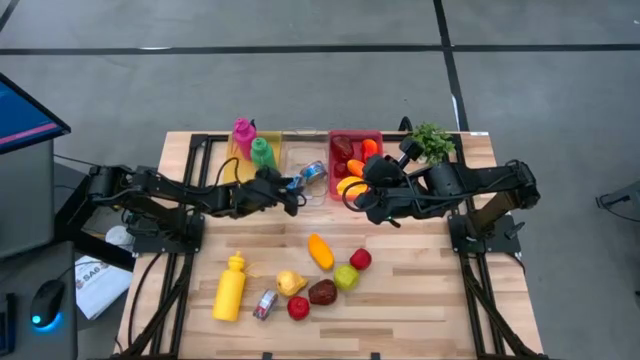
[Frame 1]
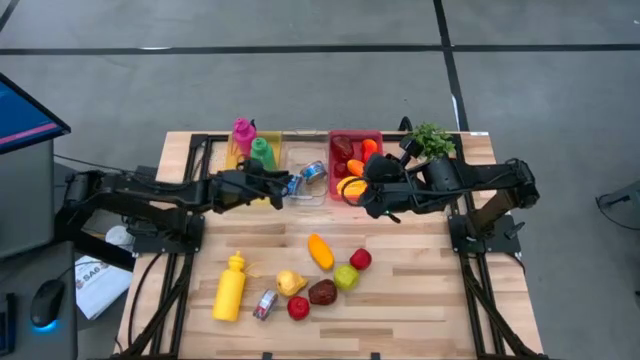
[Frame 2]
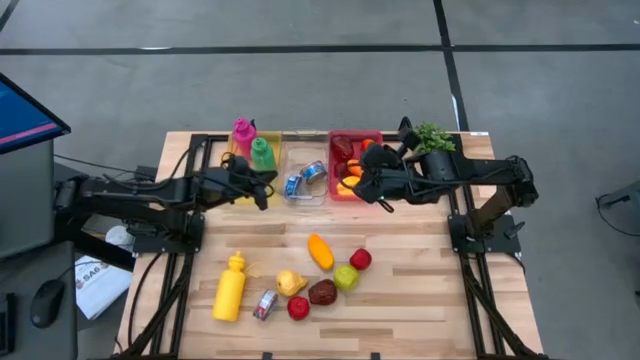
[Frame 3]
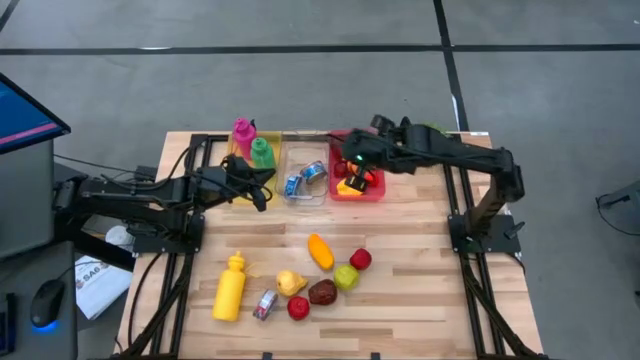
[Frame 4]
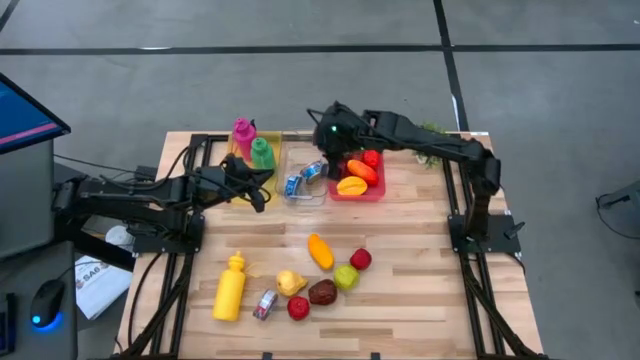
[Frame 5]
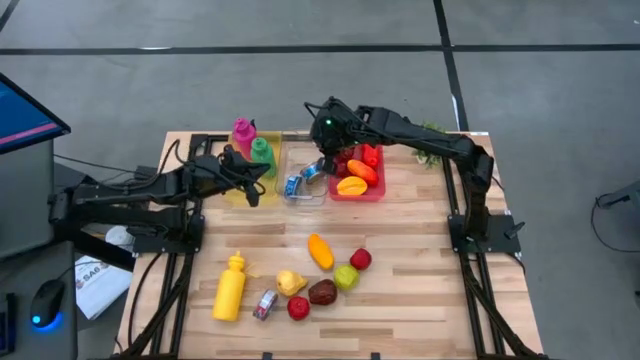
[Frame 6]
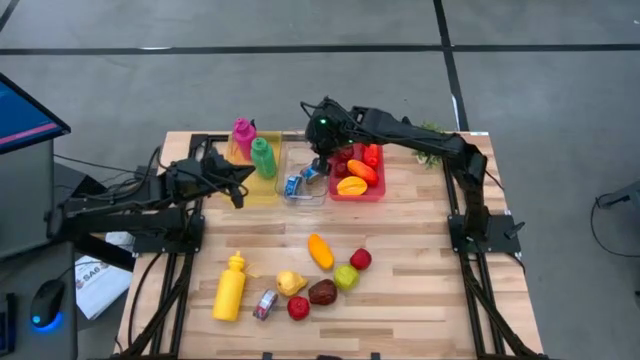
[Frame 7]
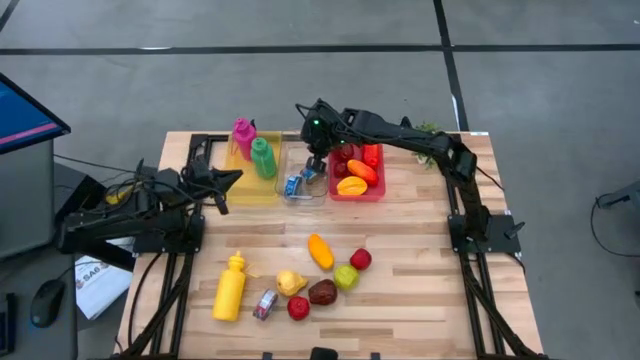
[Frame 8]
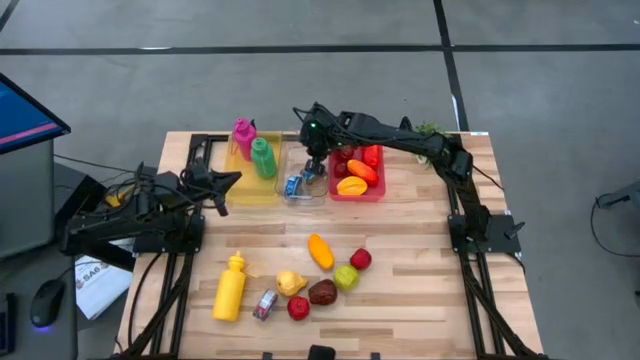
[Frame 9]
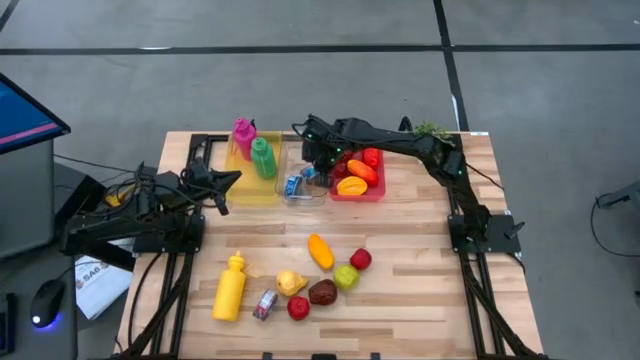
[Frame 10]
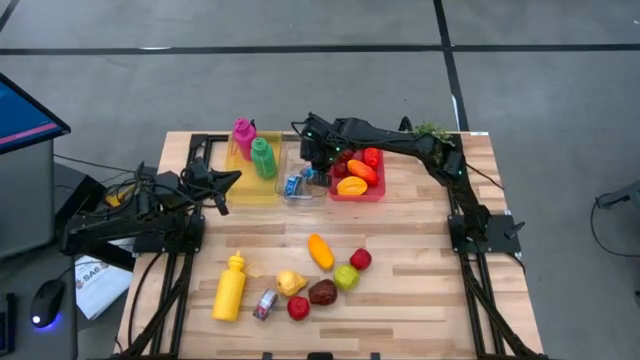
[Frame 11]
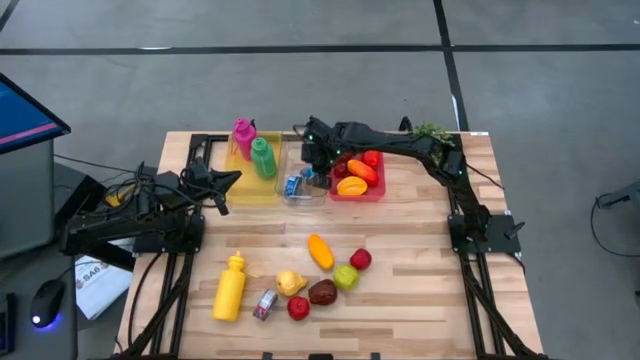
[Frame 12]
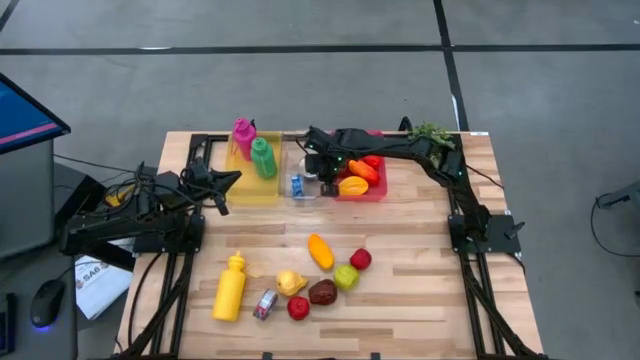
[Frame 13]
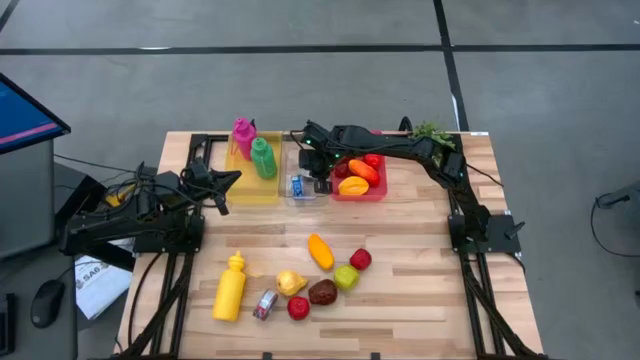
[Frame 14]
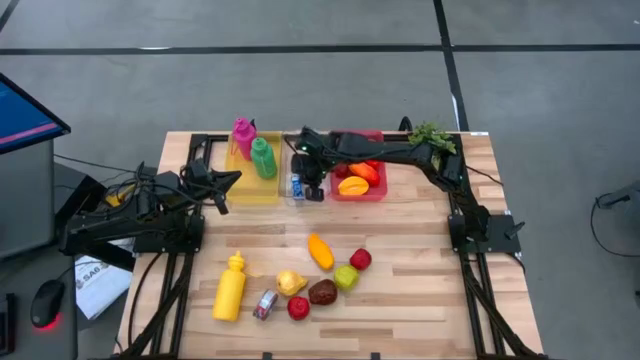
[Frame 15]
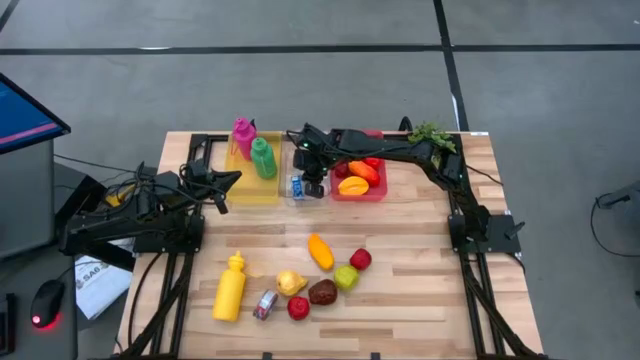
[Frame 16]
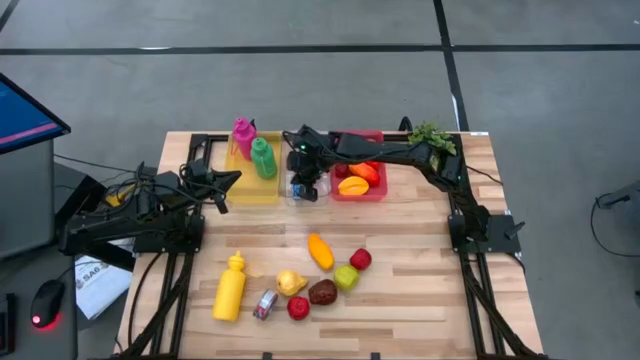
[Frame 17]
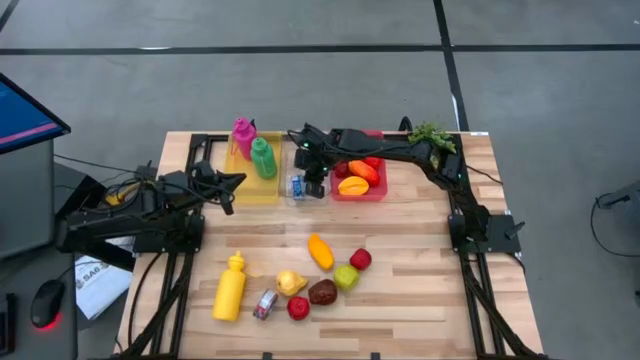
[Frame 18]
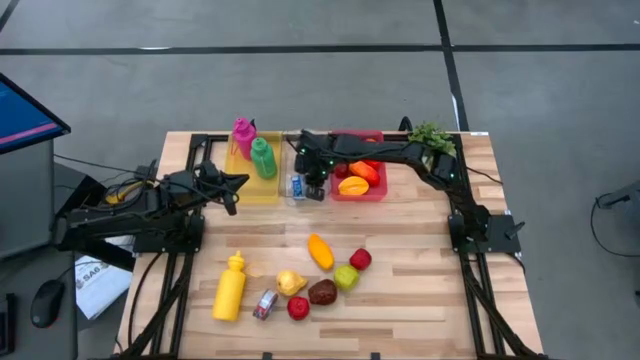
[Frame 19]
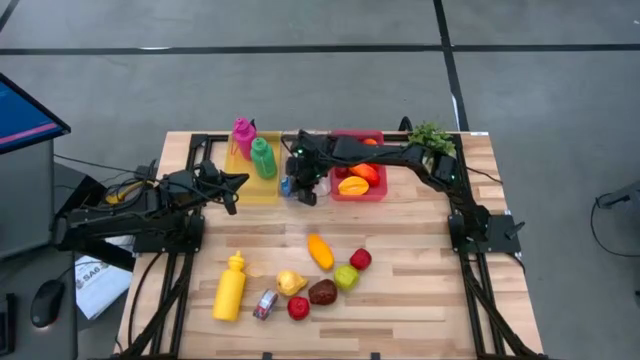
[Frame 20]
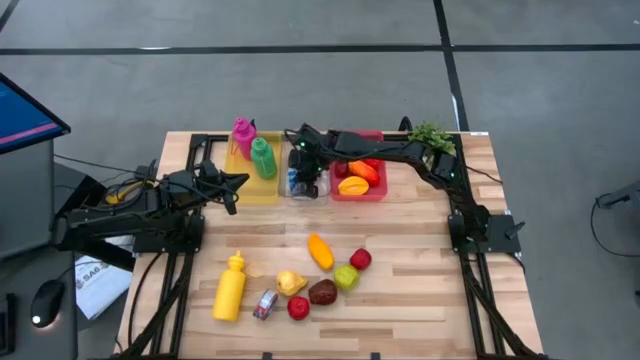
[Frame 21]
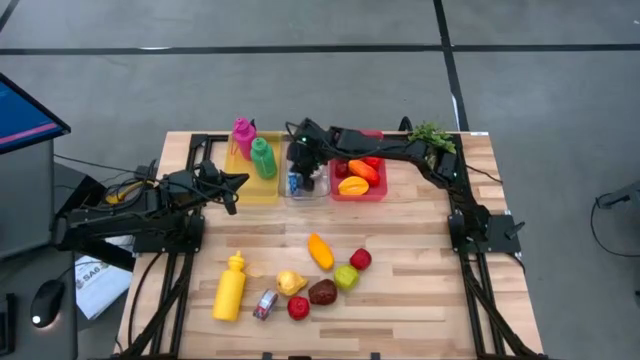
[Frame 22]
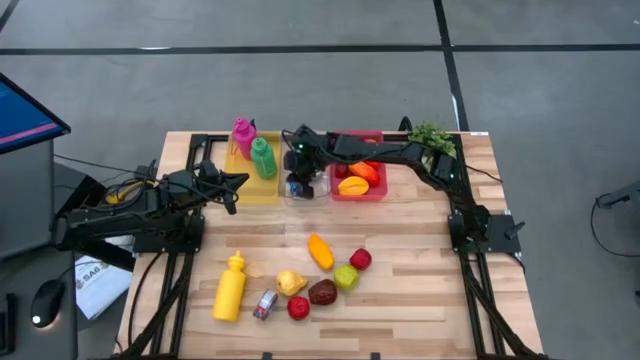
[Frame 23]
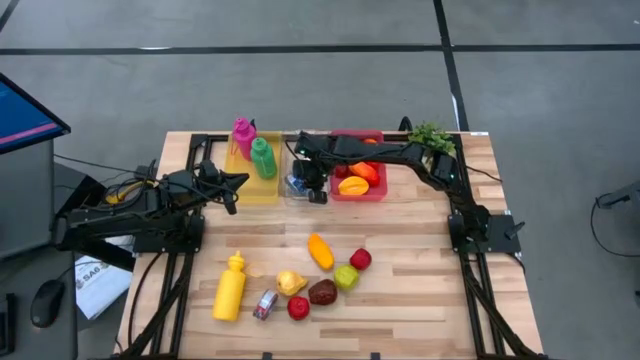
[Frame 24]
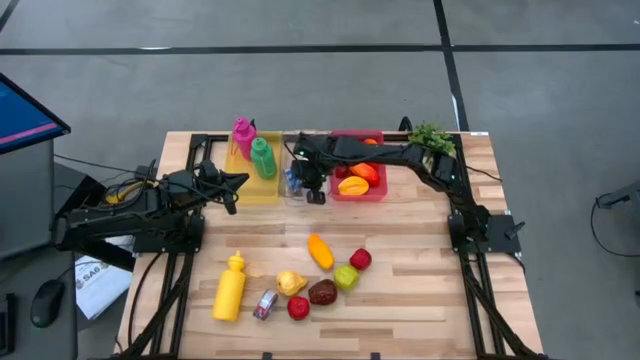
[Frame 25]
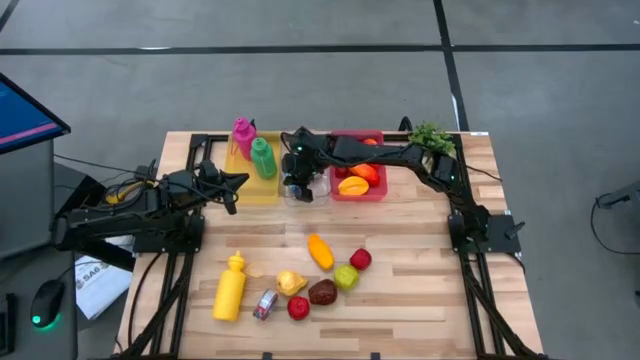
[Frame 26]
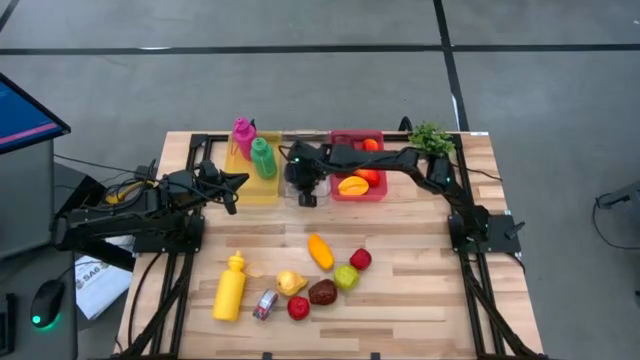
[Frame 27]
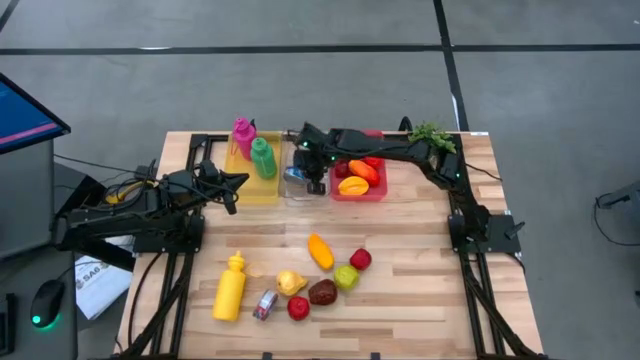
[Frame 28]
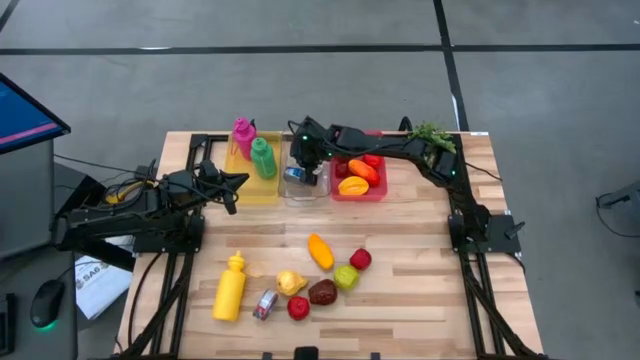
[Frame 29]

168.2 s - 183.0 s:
Task: Pick & Place Food Item
Adjust the tuna cans in the transparent bin

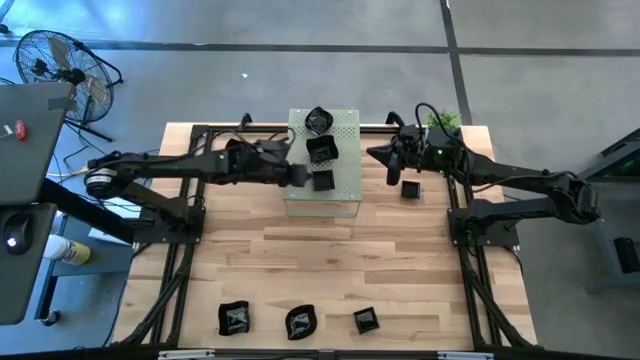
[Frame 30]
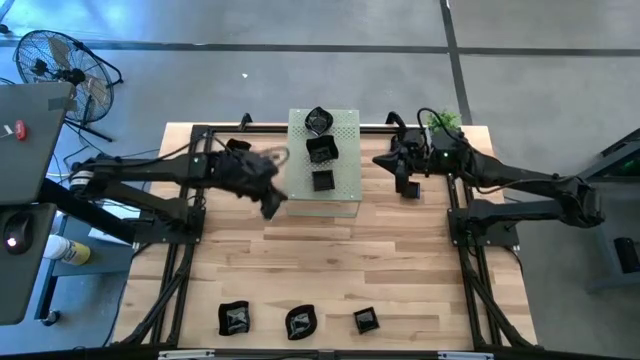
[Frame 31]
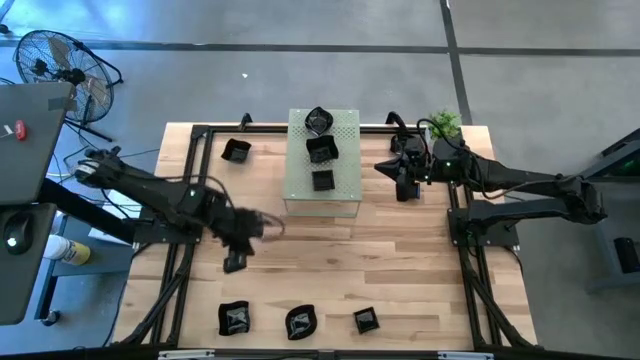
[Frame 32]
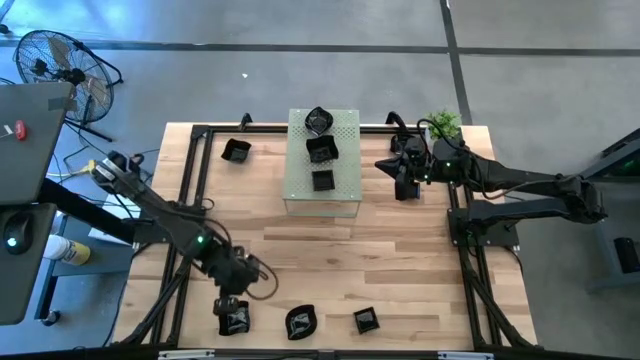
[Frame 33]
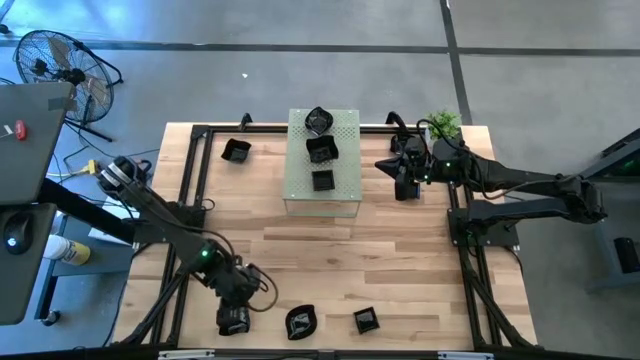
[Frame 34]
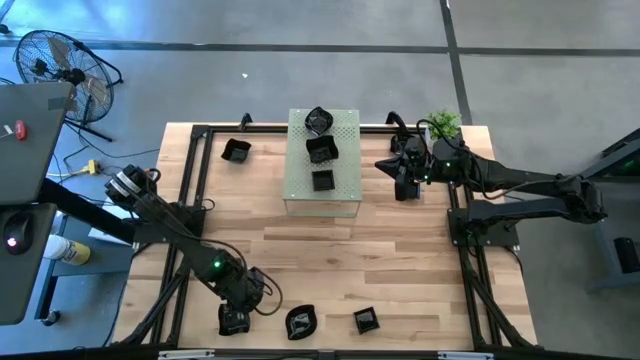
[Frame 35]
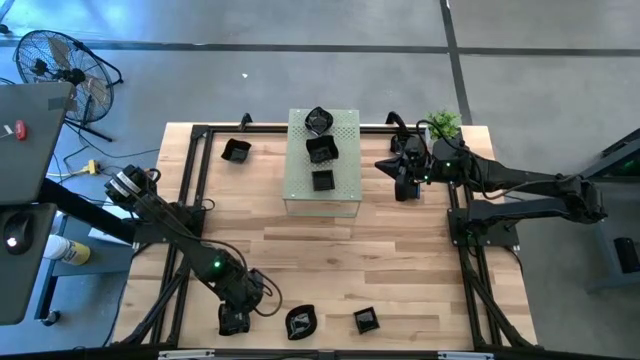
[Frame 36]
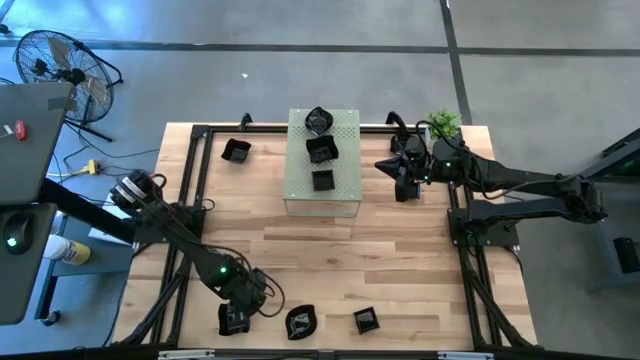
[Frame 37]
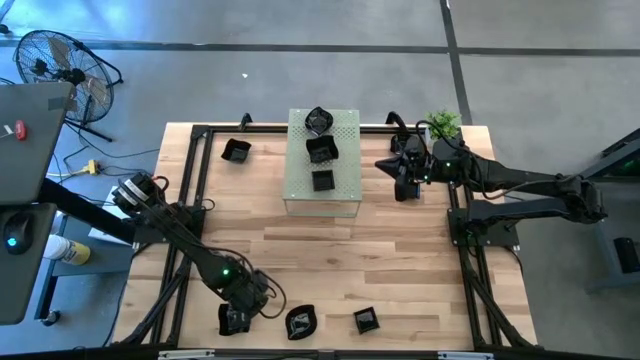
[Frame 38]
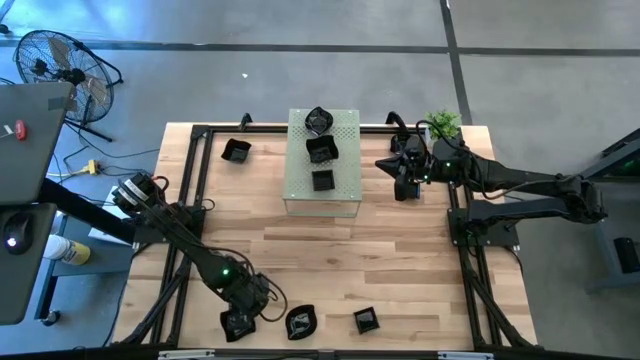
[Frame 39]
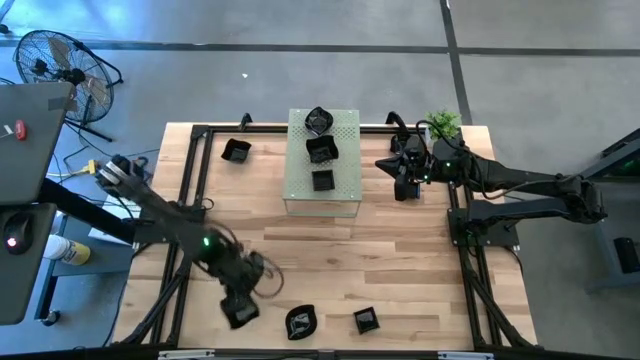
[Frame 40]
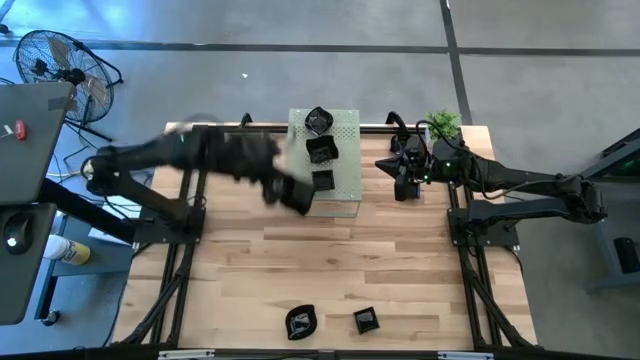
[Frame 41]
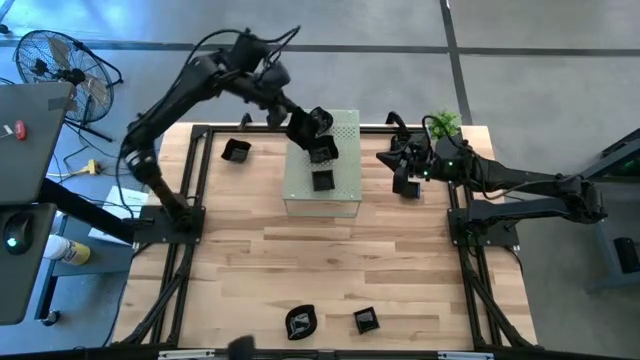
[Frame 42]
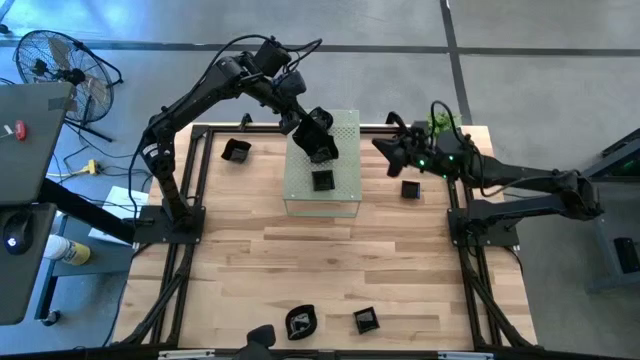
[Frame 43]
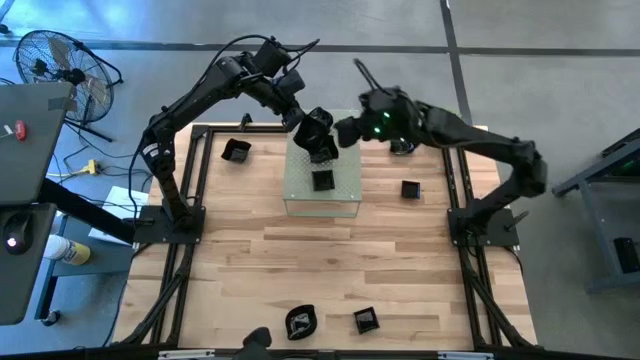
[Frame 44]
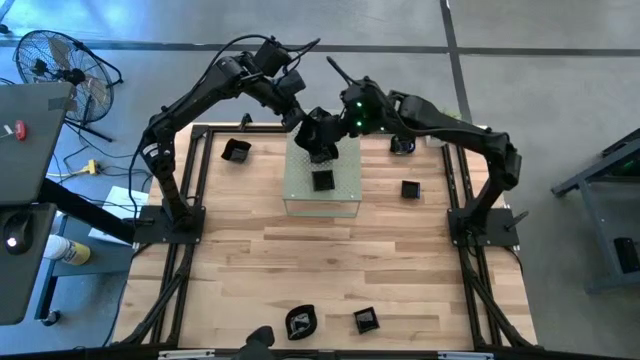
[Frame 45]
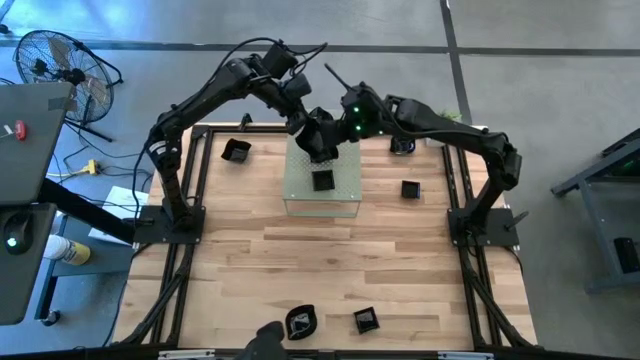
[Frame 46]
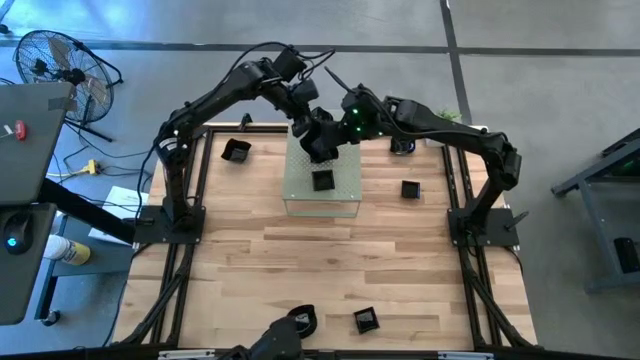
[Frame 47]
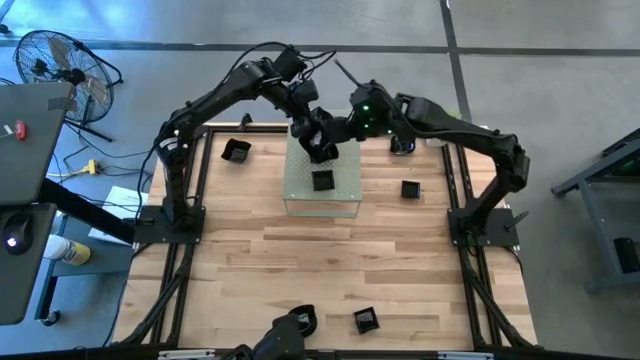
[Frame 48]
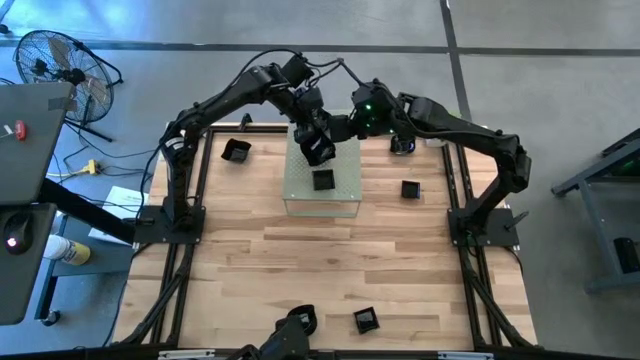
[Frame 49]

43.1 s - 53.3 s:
Task: Pick & Place Mini shaped plates
Stack the bottom black distorted plate on top of the black distorted plate on the shelf
